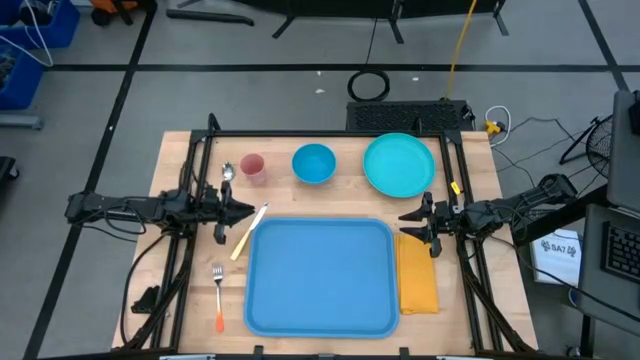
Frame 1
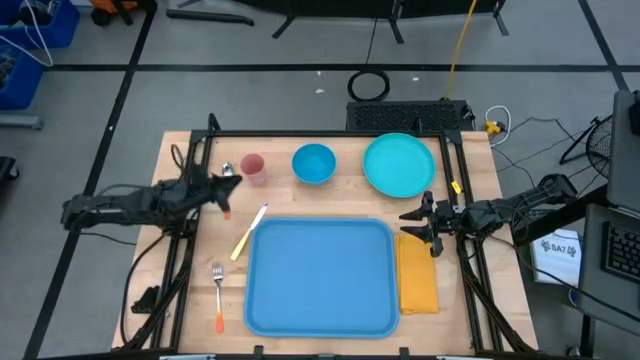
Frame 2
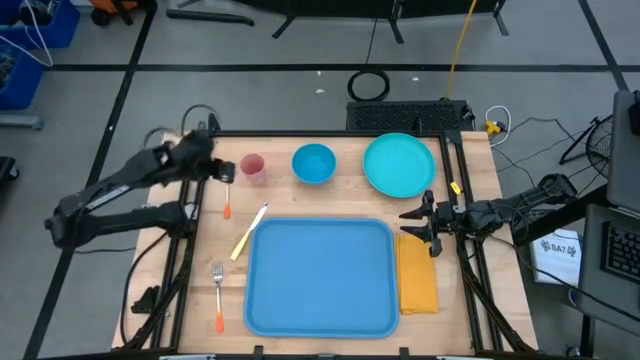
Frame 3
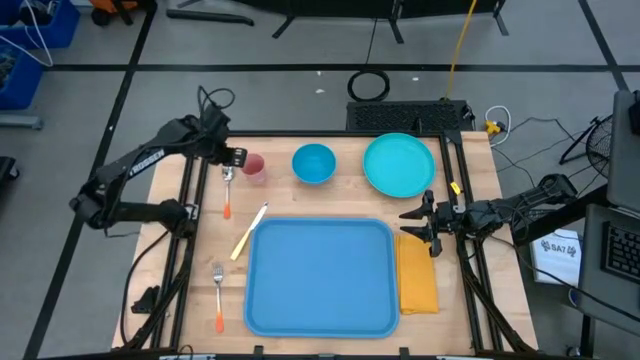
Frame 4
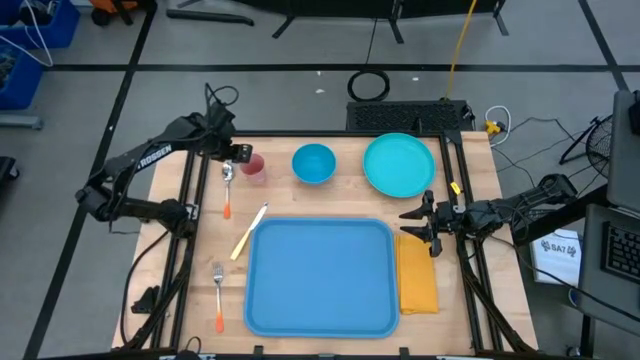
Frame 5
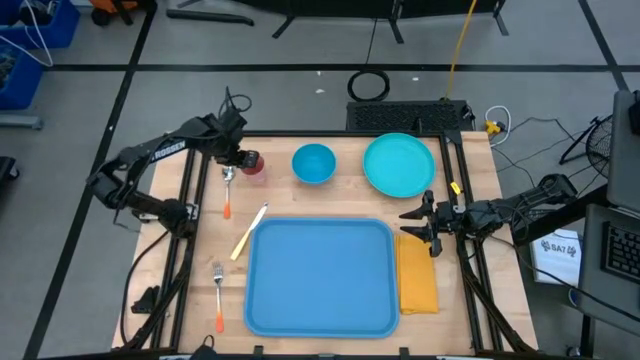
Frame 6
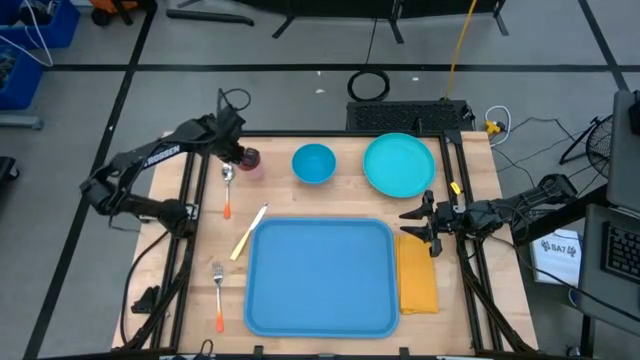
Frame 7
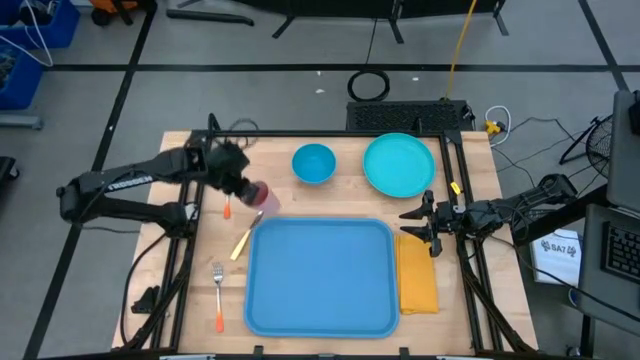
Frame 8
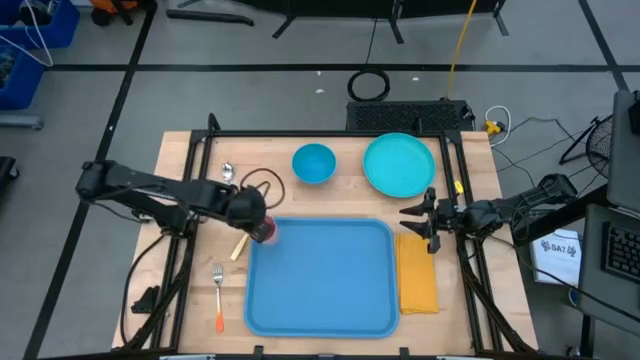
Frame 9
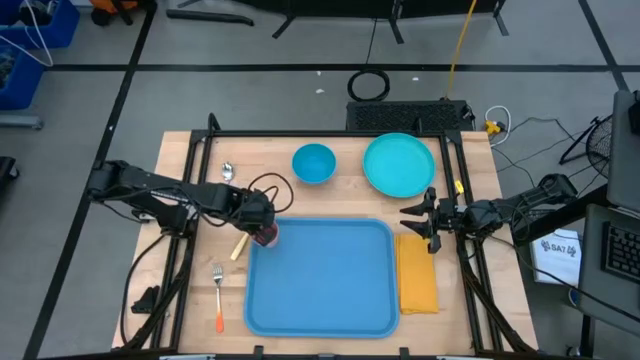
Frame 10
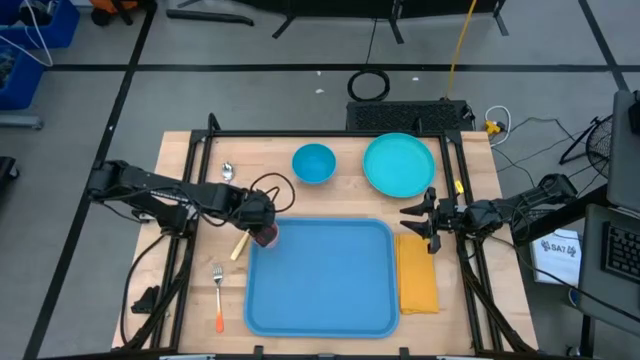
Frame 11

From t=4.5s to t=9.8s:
Task: Set up tray
Put the pink cup on the blue serving tray

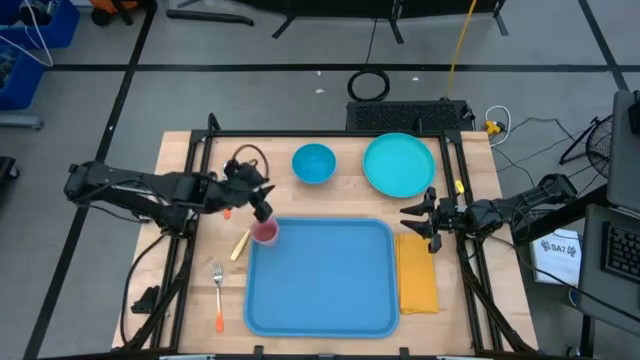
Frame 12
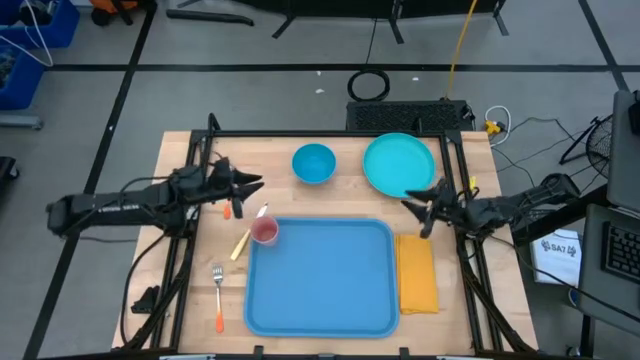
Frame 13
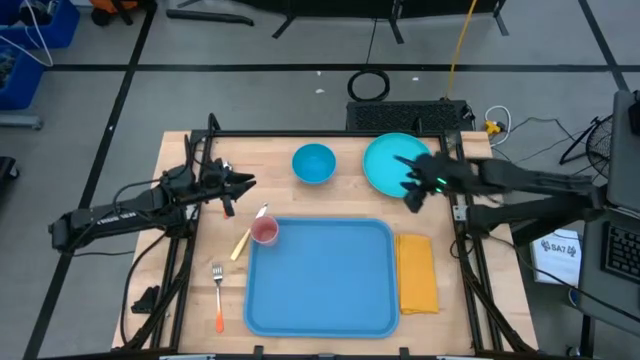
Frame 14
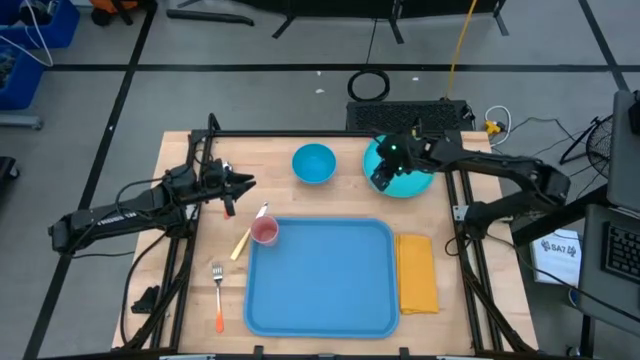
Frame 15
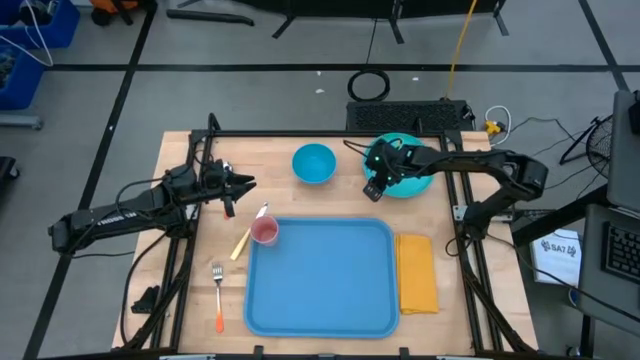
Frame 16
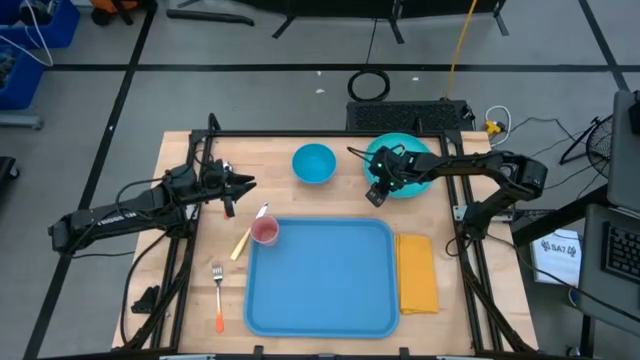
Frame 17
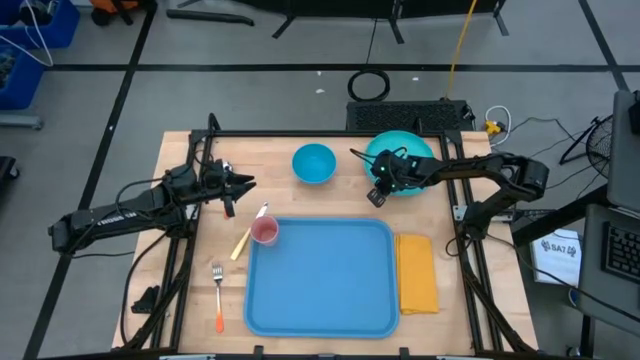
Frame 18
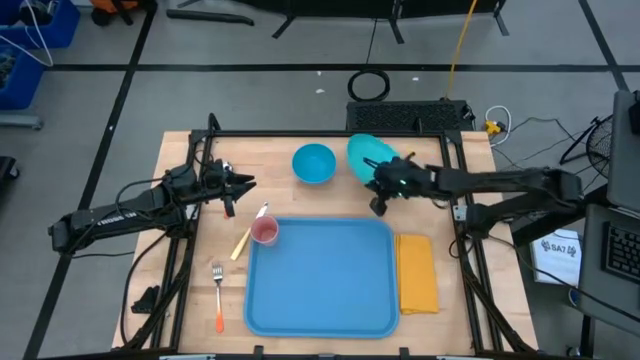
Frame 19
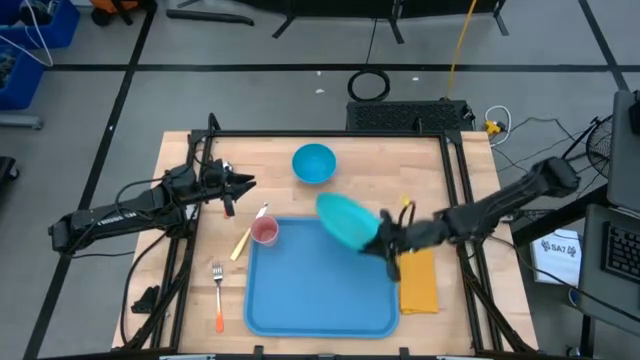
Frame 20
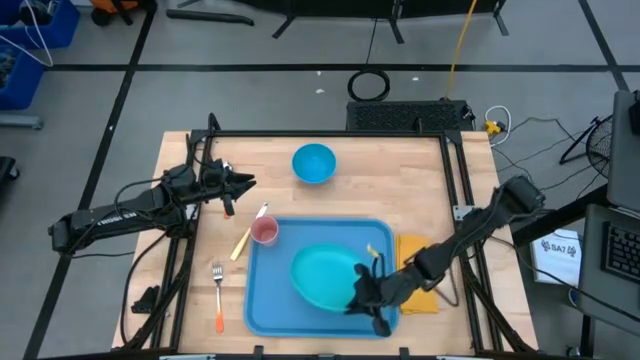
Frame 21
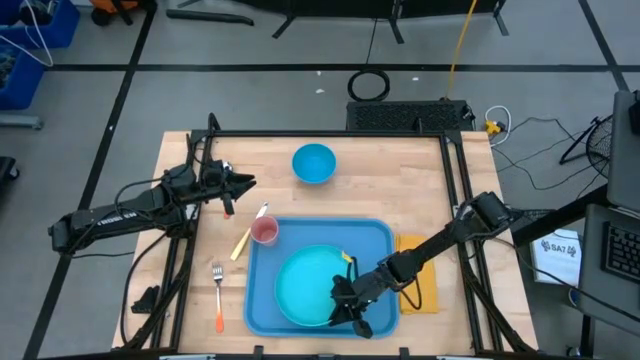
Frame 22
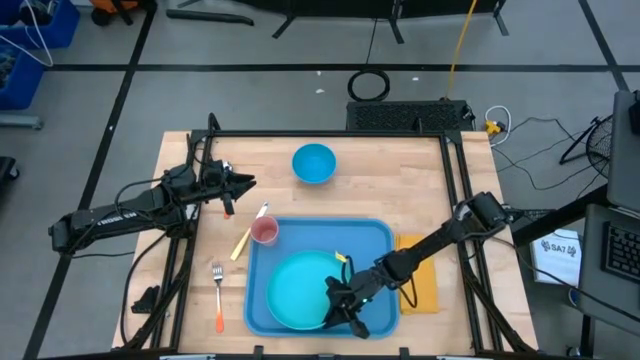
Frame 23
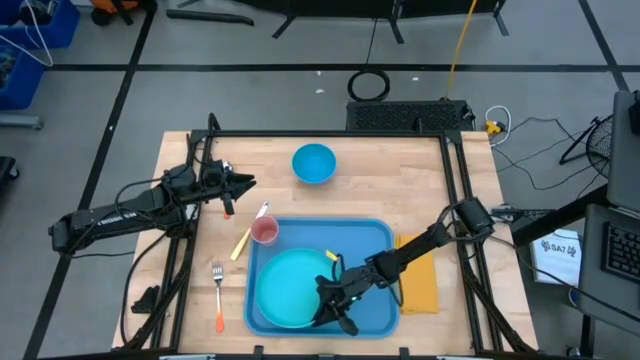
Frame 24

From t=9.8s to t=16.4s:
Put the green plate on the blue serving tray to the bottom right of the pink cup

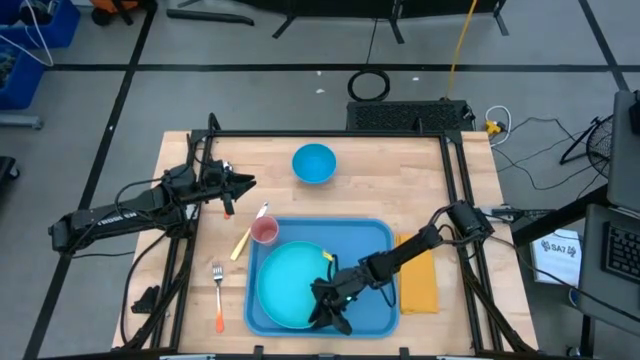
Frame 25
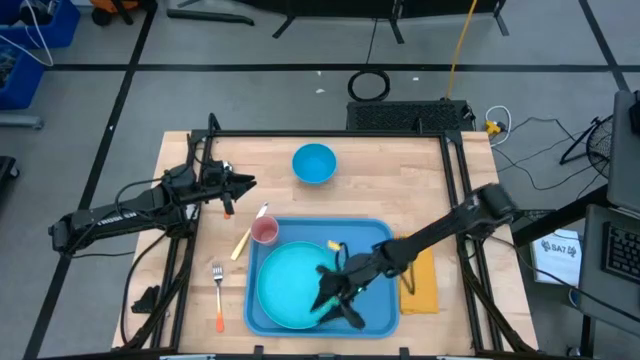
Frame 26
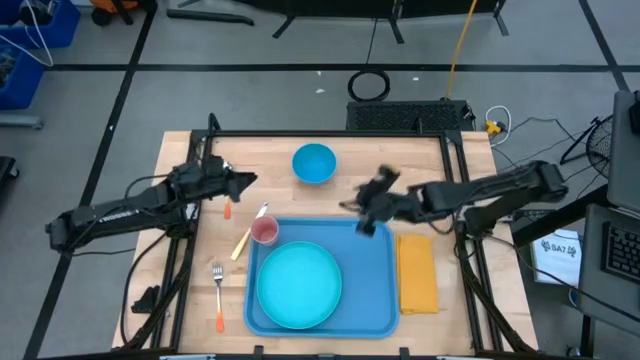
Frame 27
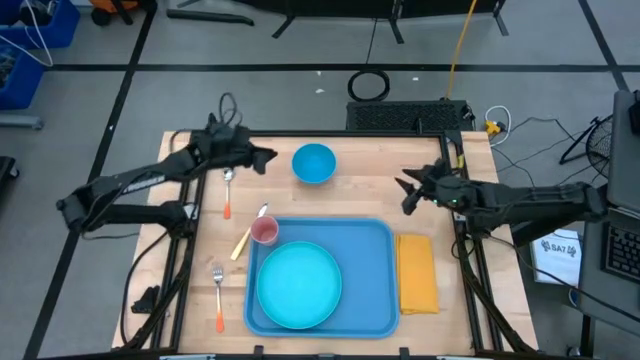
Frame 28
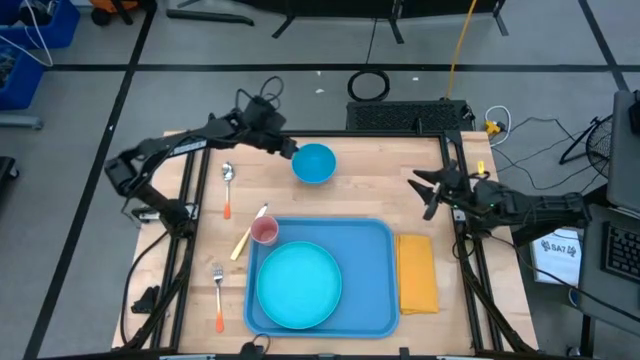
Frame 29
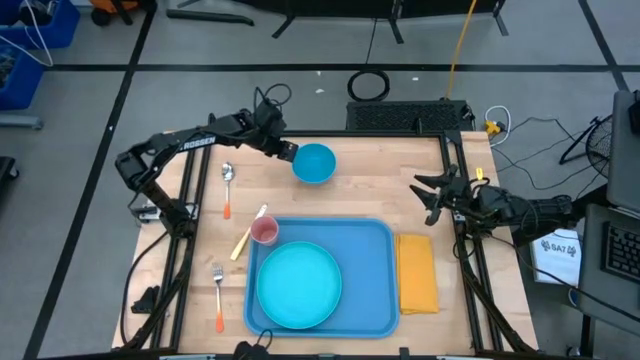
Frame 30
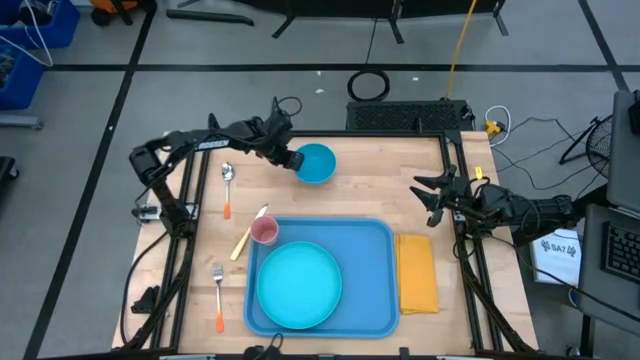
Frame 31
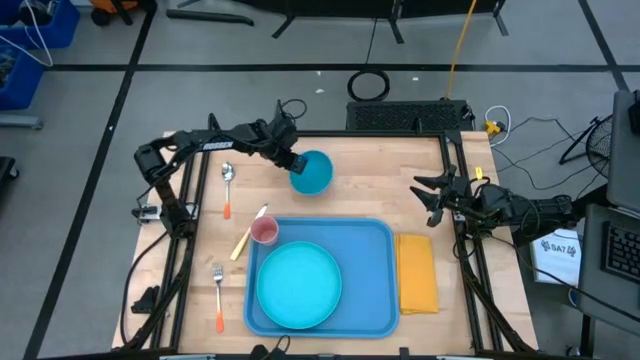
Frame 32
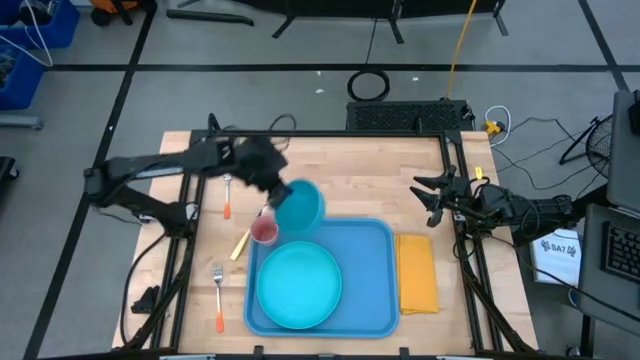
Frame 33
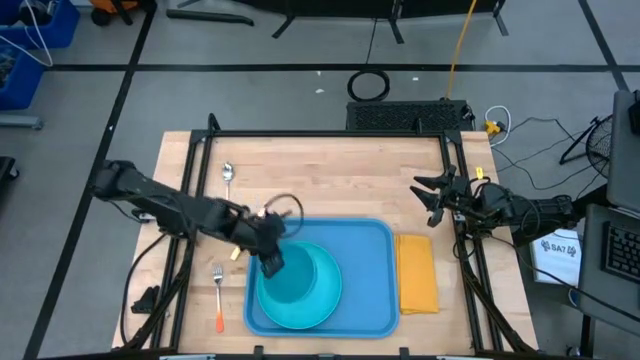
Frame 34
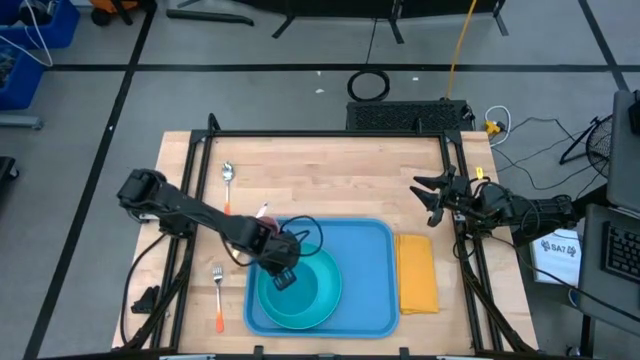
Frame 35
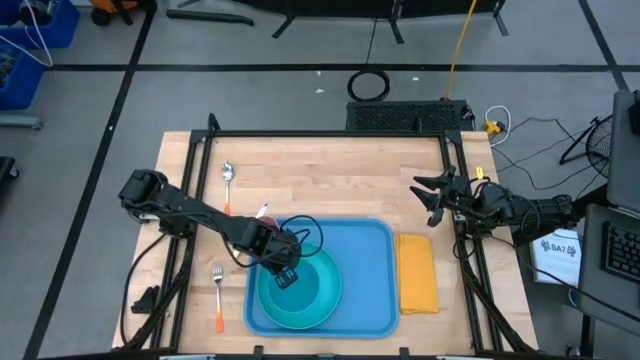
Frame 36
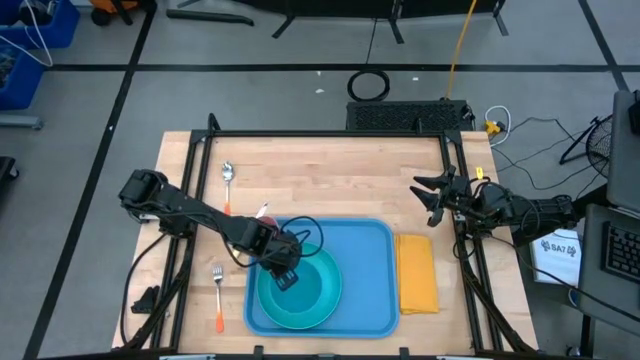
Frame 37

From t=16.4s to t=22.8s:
Put the blue bowl on the green plate

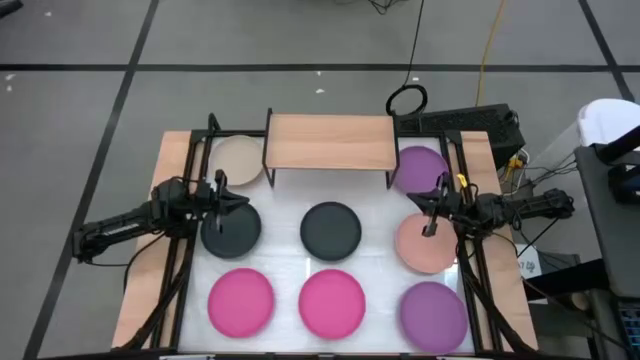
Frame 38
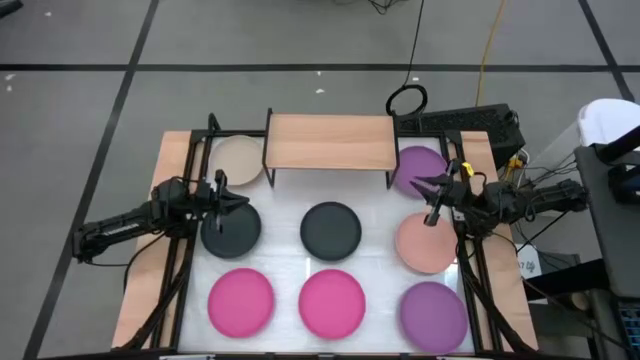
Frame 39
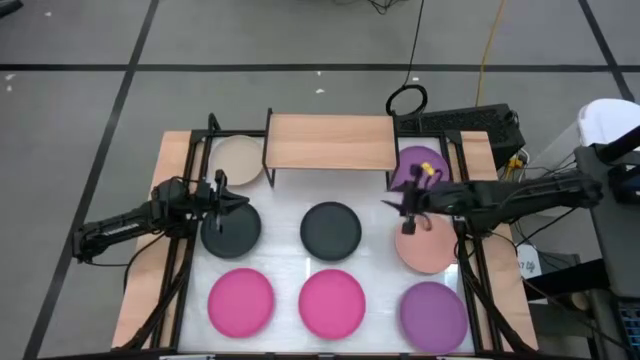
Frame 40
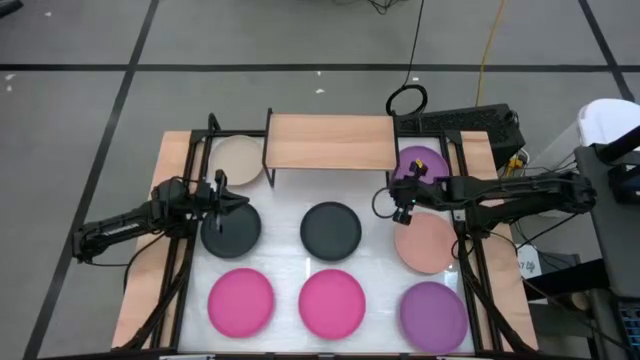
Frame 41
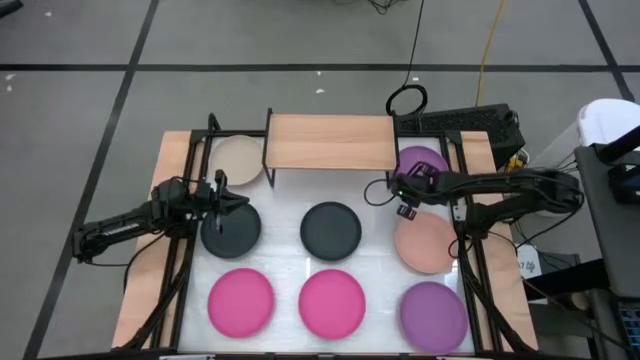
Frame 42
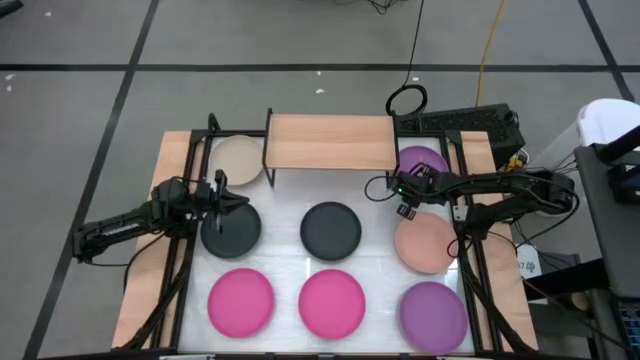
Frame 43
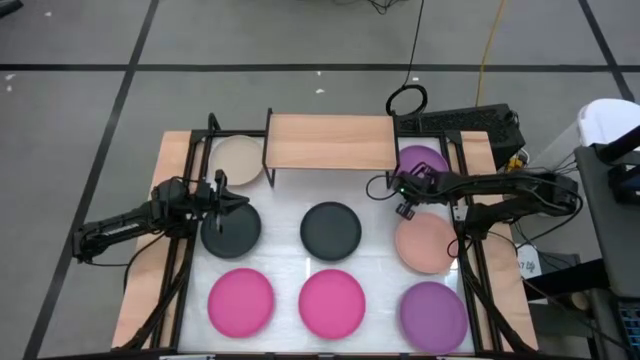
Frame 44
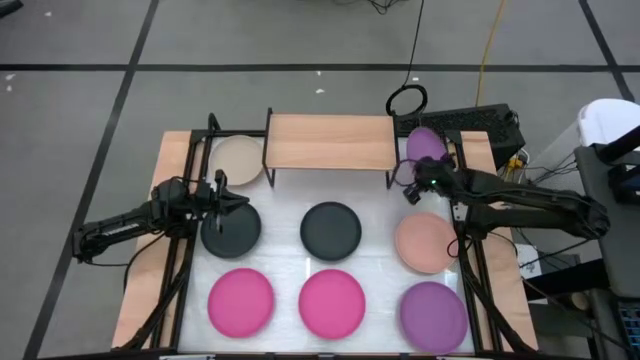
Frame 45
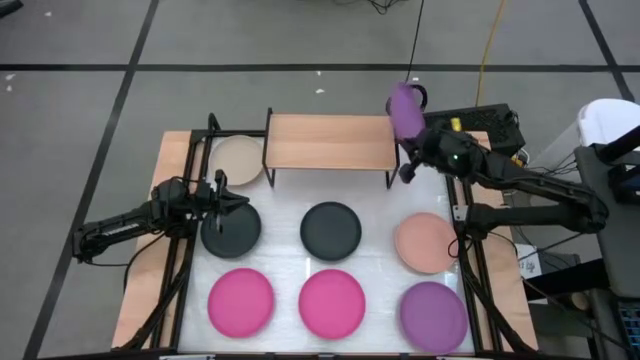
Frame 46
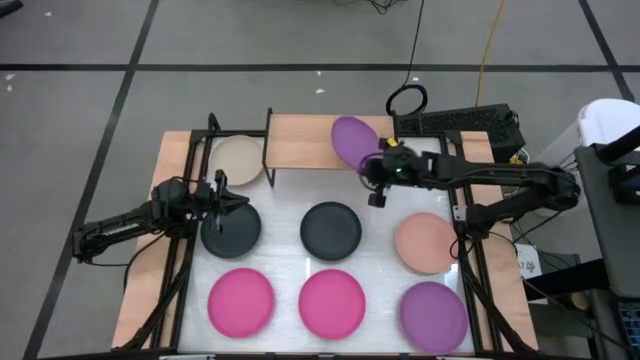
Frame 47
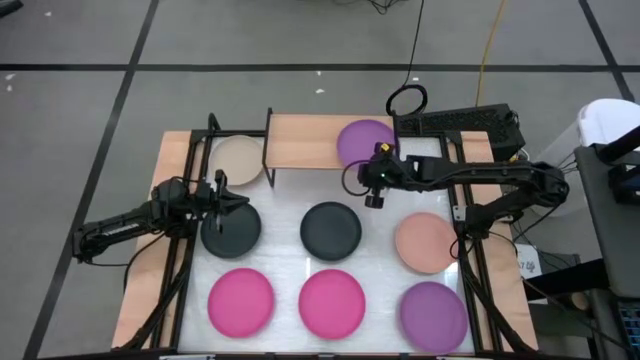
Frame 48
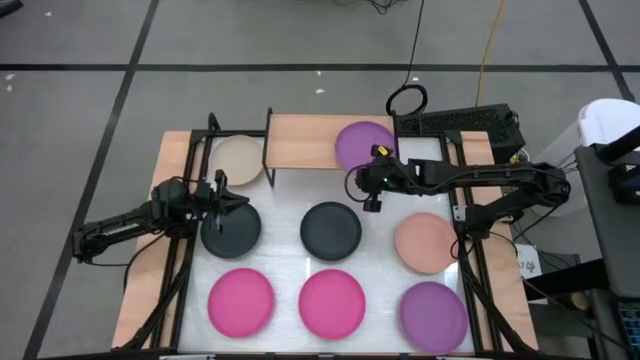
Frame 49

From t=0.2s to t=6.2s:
Task: Place and stack plates onto a shelf
Put the top violet plate on the shelf
